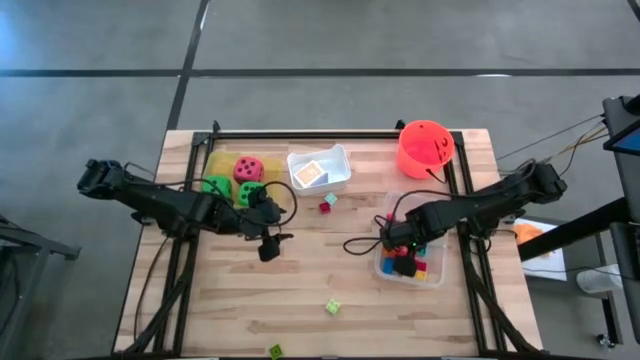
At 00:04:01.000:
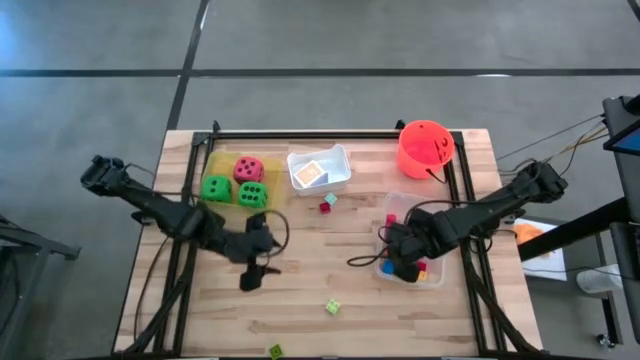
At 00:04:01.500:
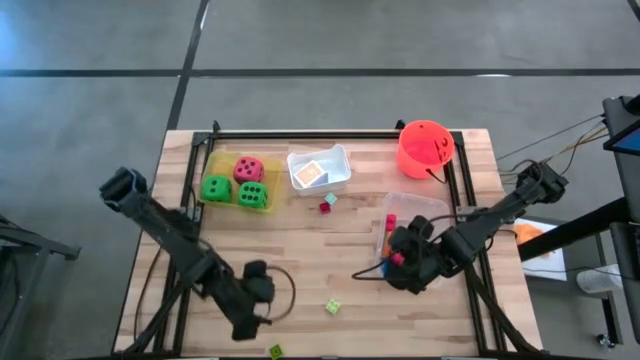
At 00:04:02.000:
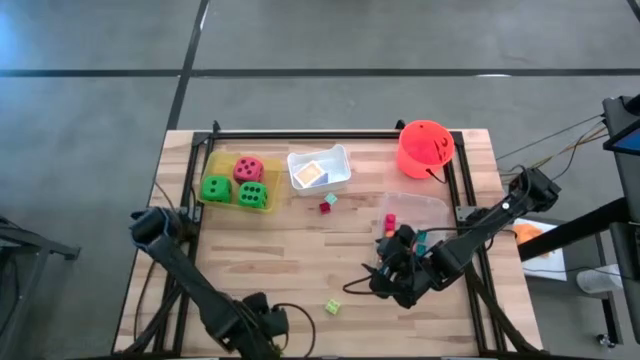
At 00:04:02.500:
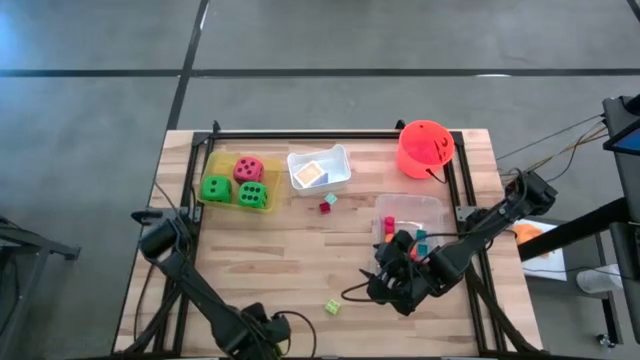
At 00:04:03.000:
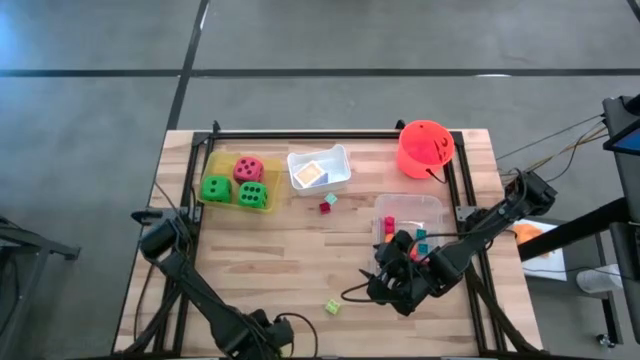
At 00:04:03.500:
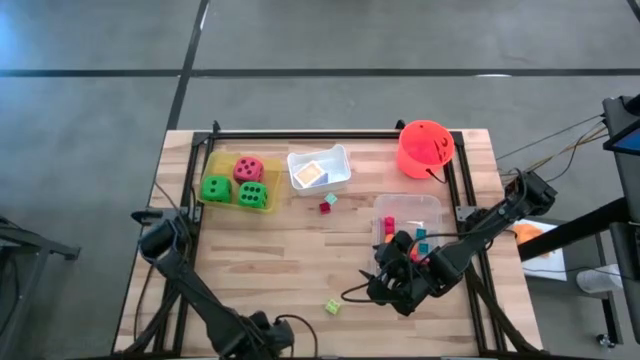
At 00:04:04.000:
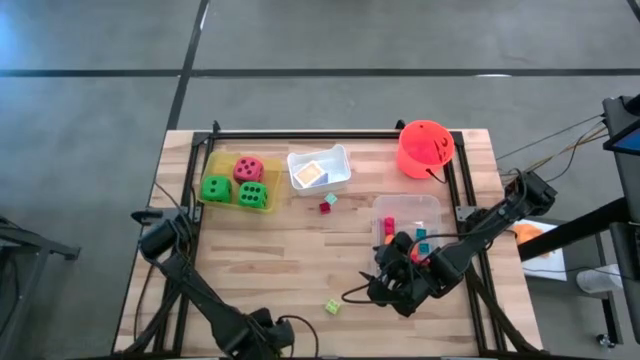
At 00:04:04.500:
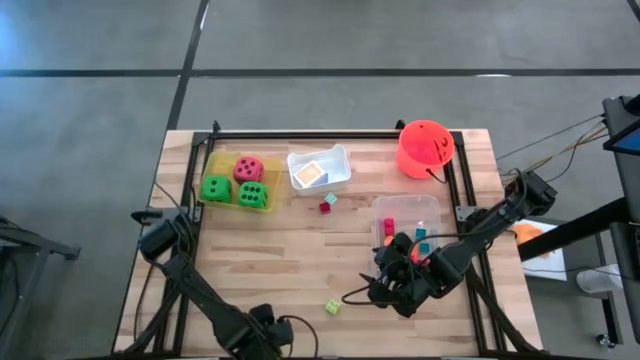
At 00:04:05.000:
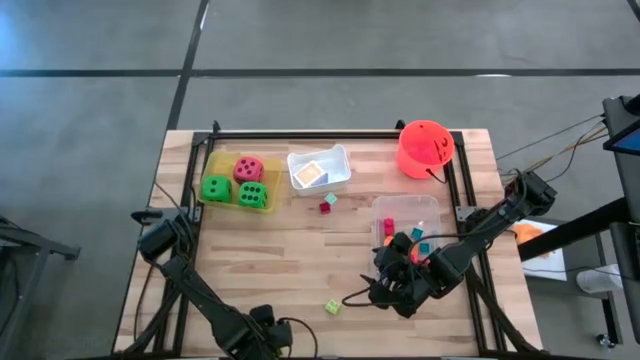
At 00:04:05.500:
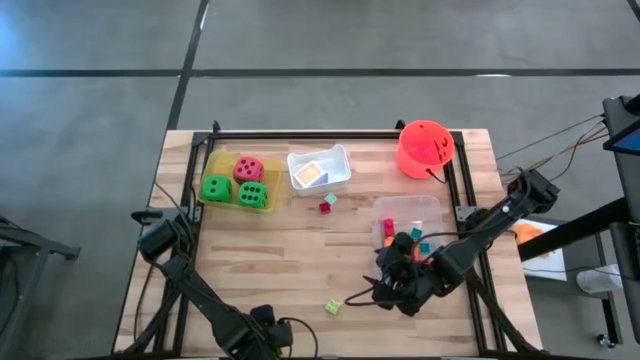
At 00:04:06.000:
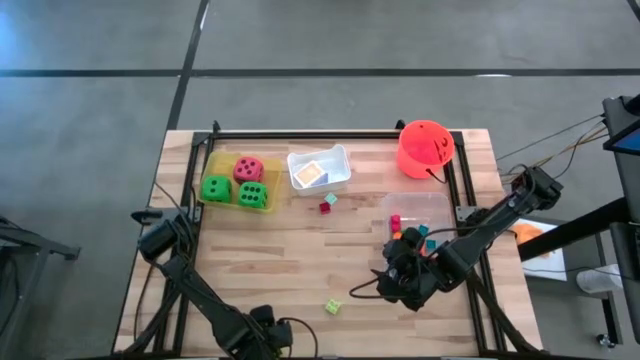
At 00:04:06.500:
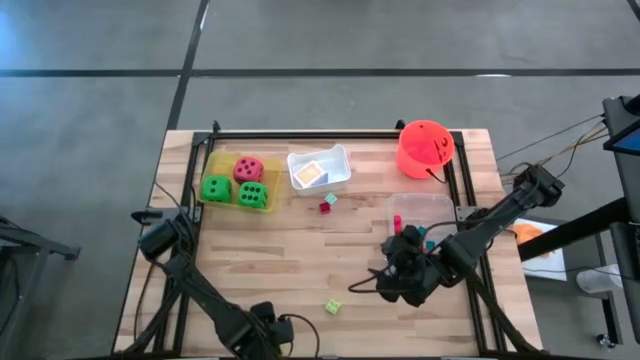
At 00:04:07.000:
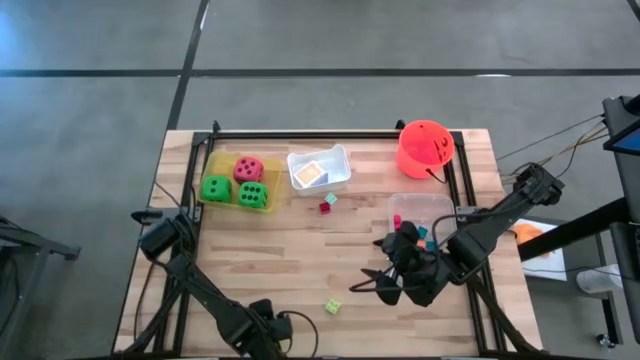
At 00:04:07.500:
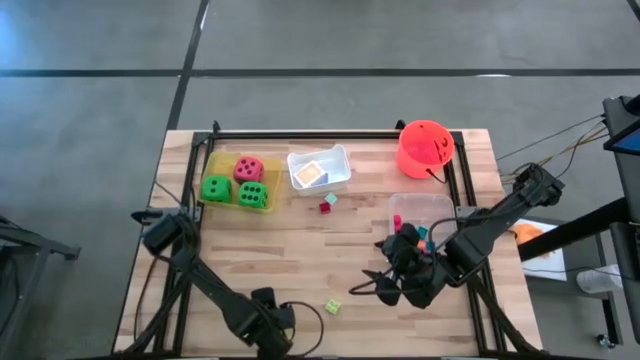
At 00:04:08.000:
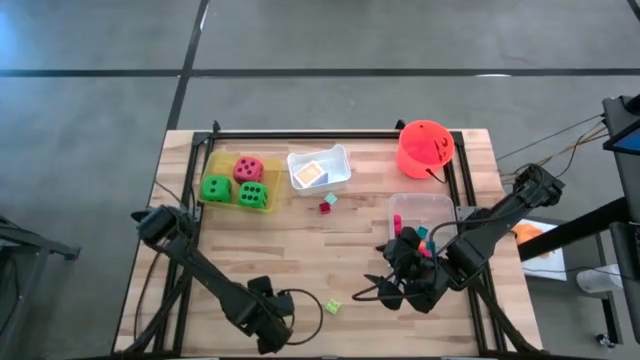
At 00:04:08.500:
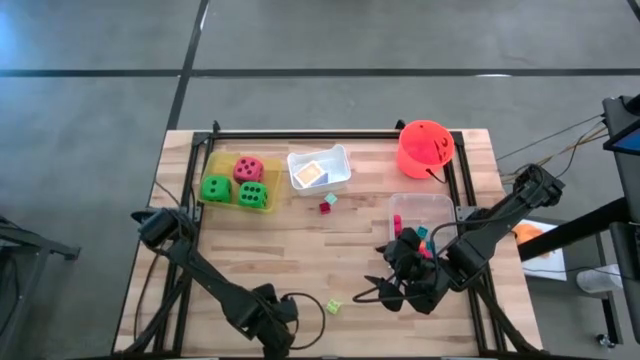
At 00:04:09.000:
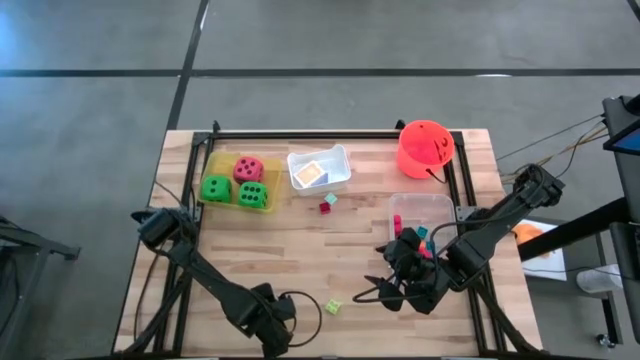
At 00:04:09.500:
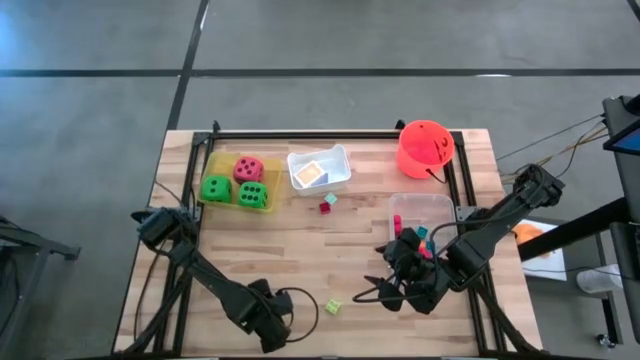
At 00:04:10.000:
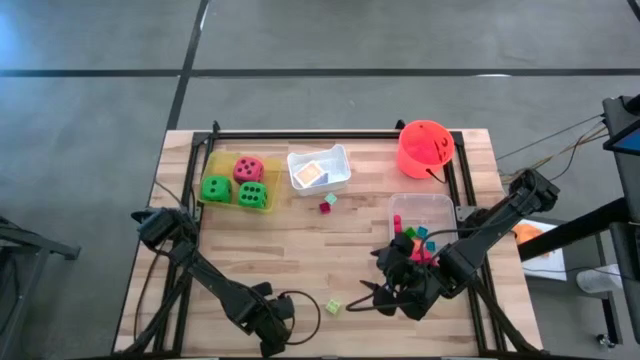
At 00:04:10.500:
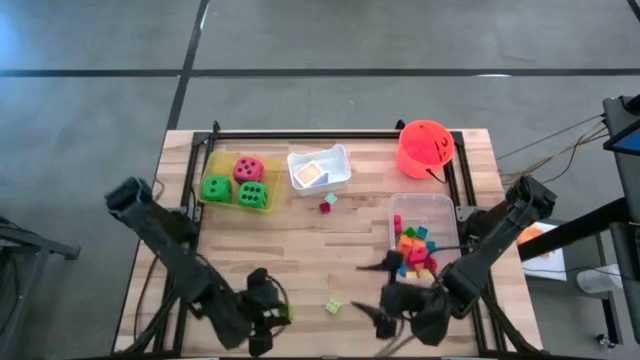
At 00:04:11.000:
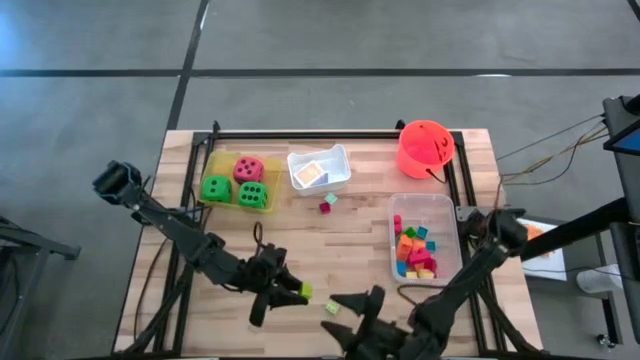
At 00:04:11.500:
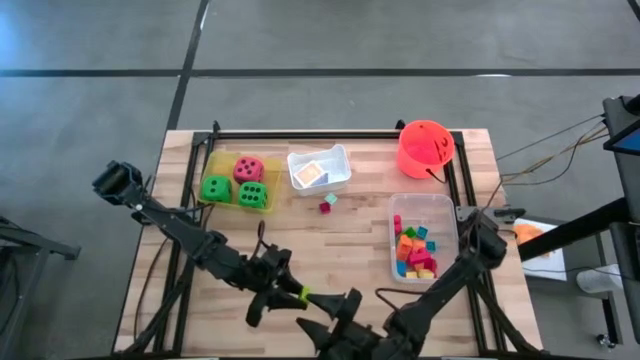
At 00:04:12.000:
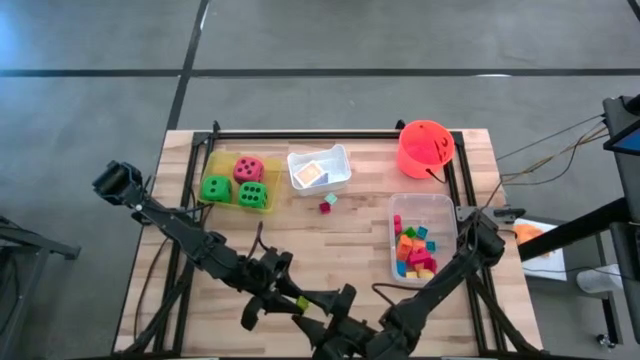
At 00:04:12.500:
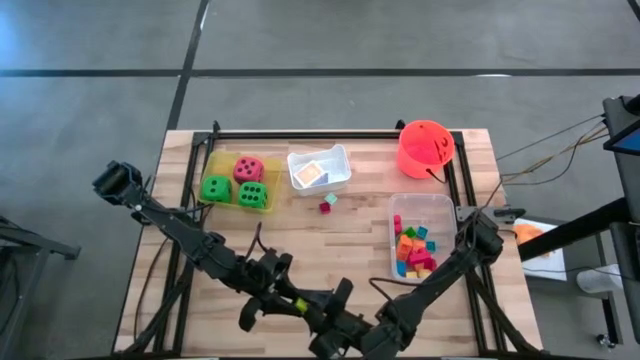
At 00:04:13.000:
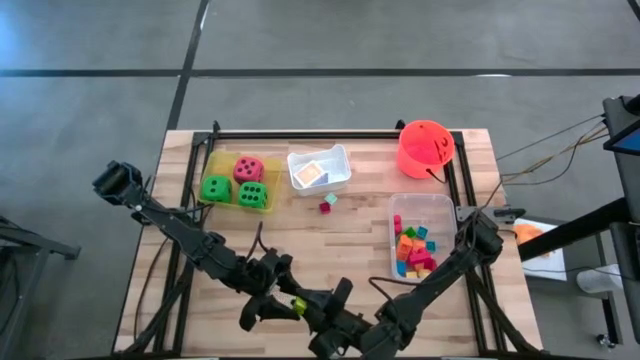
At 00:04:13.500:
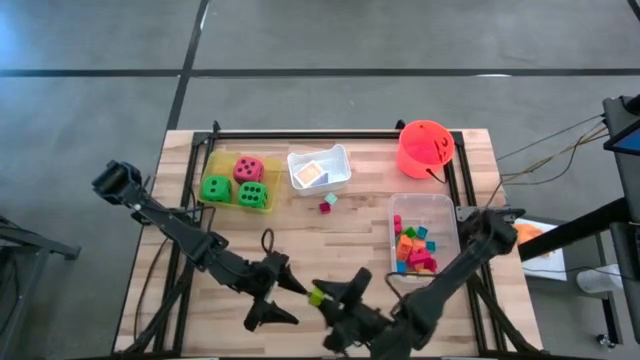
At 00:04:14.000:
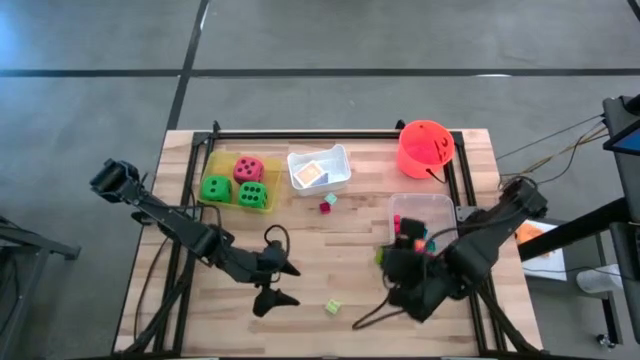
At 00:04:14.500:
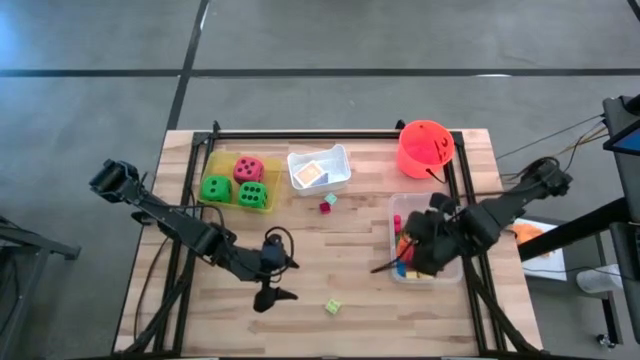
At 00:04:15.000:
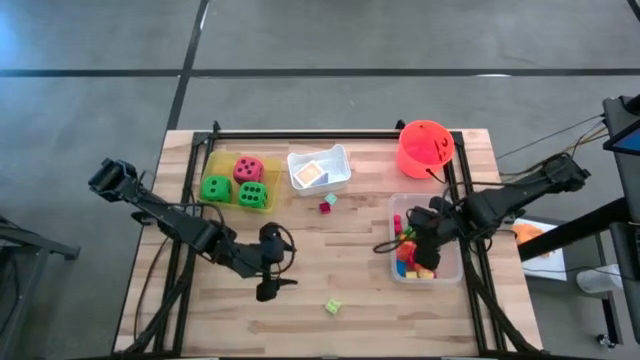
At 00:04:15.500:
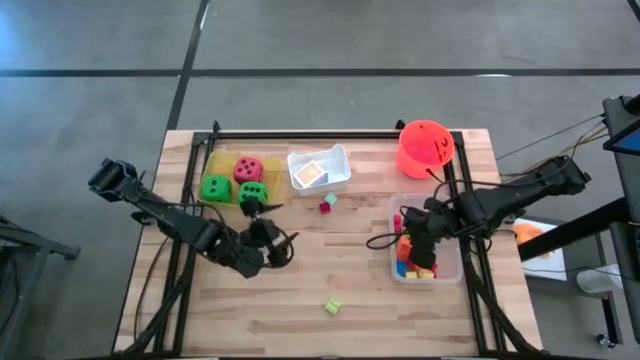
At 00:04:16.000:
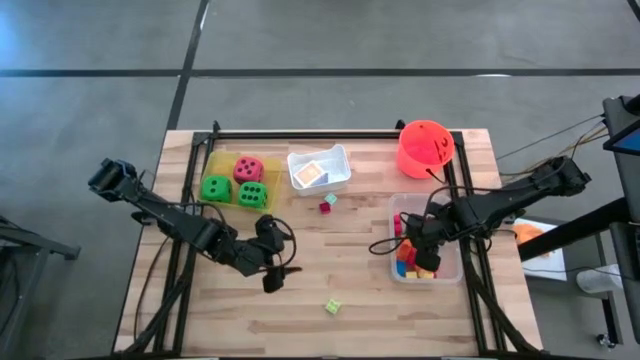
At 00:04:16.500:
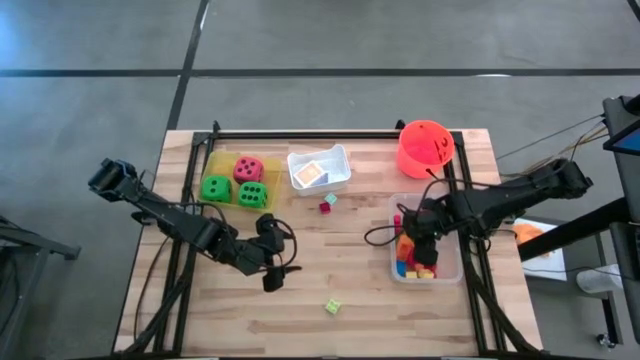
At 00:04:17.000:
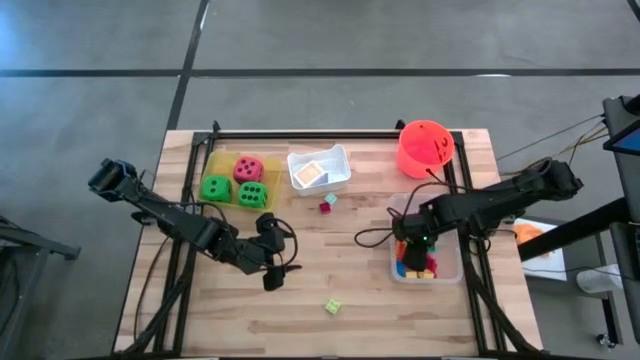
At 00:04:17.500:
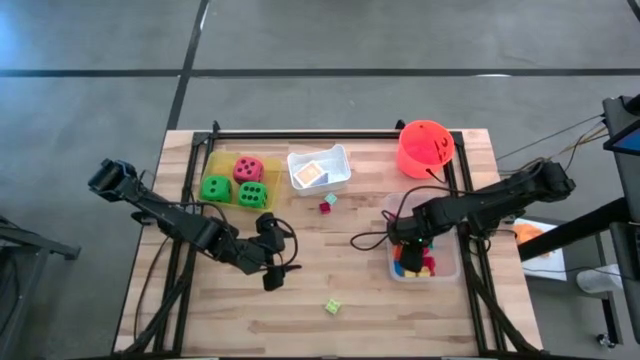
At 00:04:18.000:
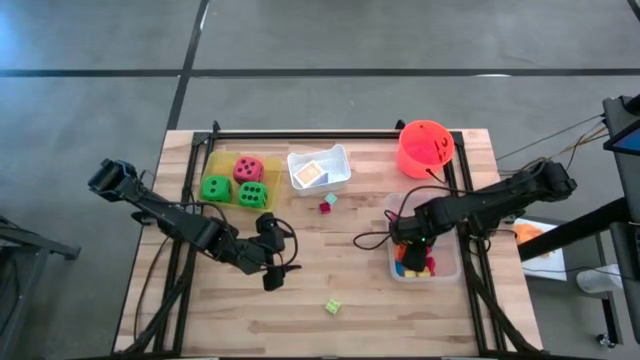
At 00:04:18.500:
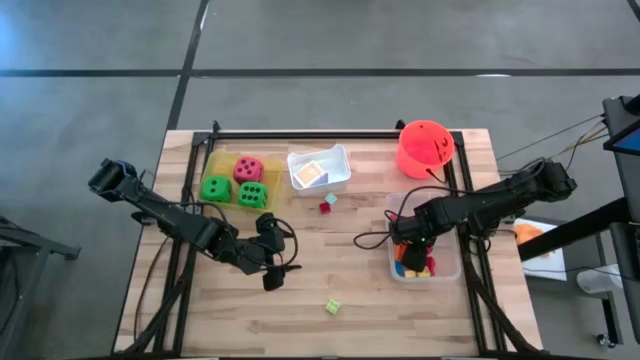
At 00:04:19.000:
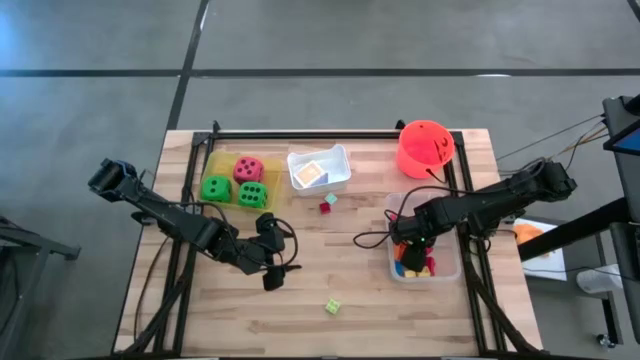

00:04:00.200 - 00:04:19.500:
Task: Pick & Place Toys
Put the green game piece into the transparent bin

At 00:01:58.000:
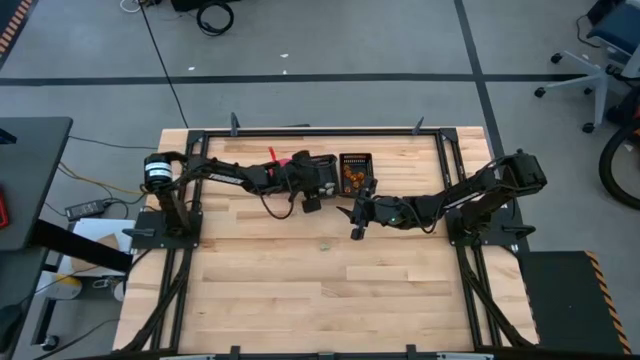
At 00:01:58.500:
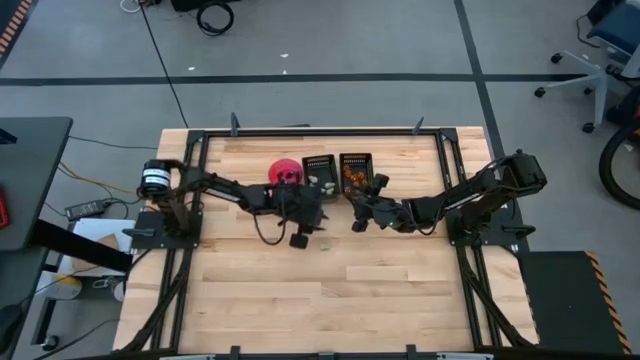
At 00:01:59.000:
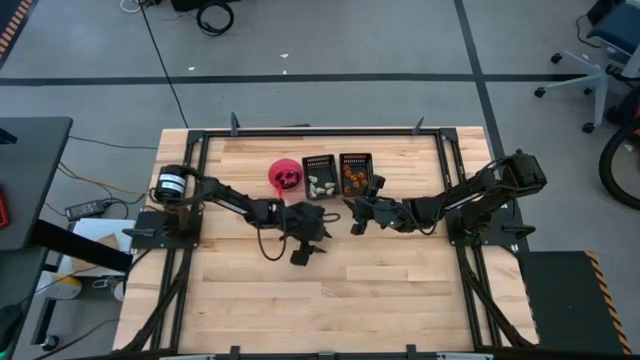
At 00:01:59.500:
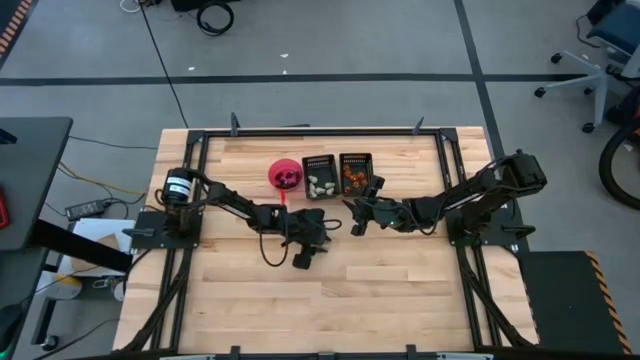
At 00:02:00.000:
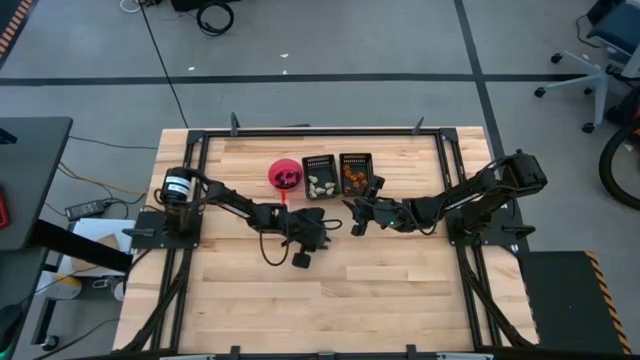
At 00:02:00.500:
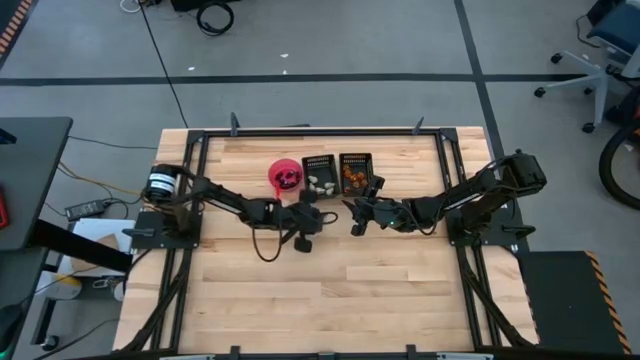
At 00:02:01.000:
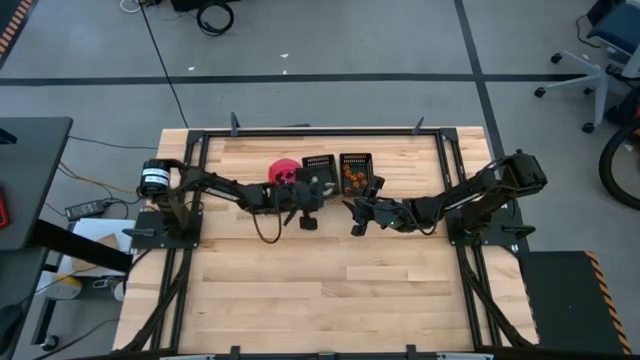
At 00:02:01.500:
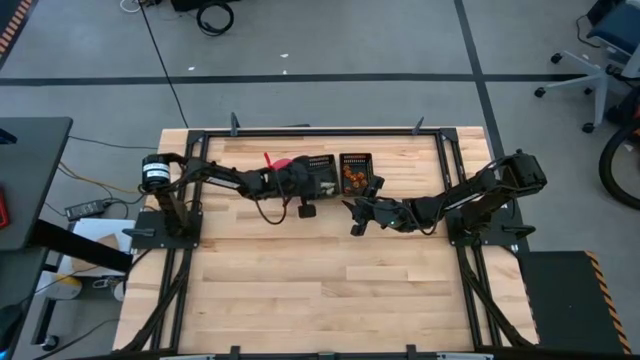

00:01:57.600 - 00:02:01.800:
Task: Sort Halloween decoration
Put the white skull toy into the left black bin
